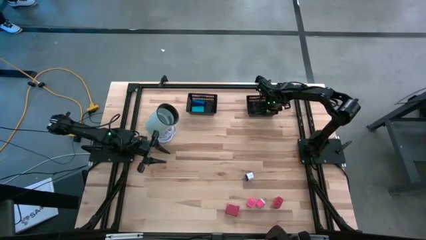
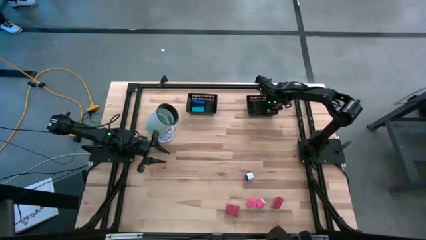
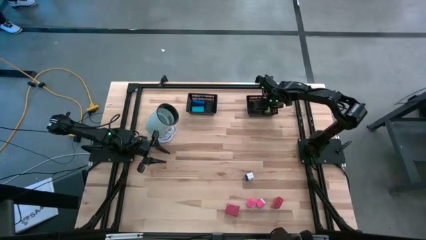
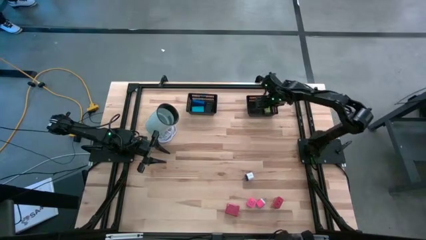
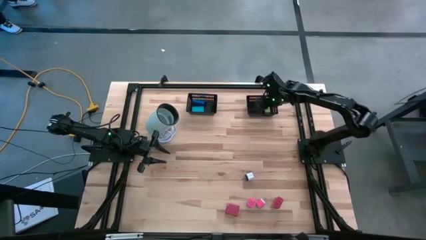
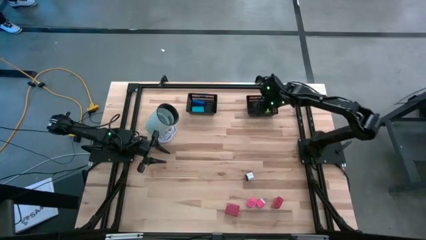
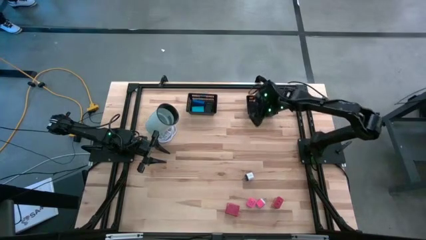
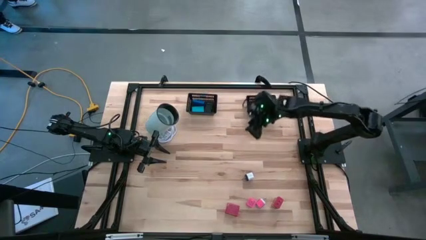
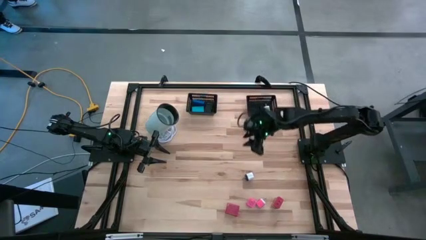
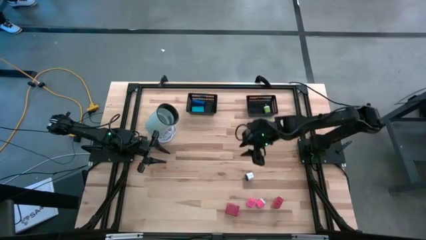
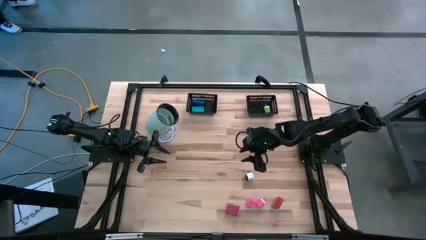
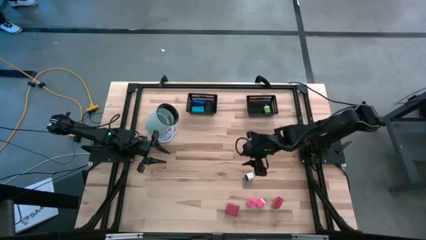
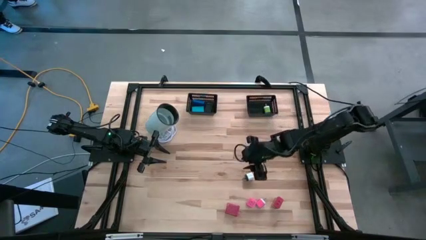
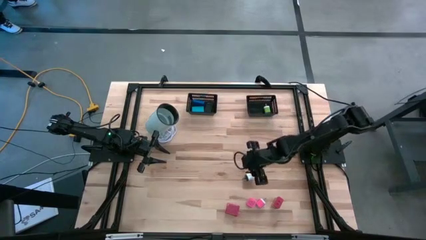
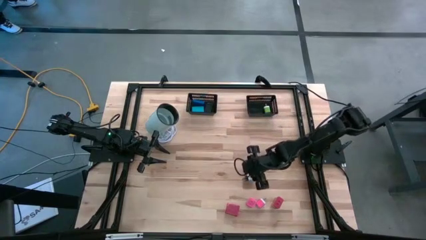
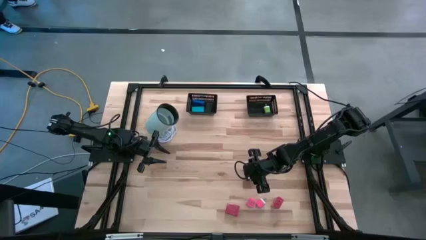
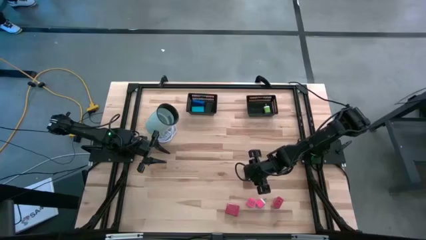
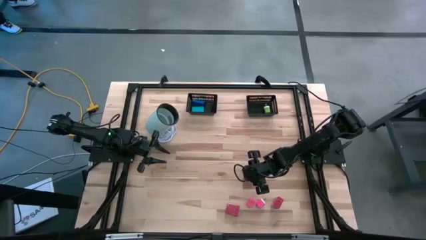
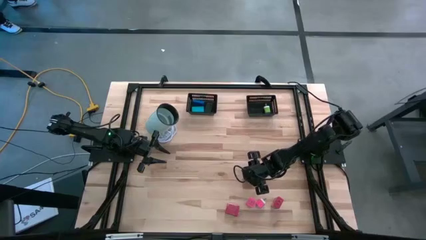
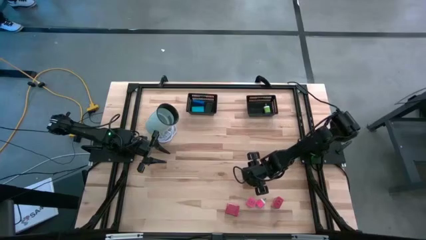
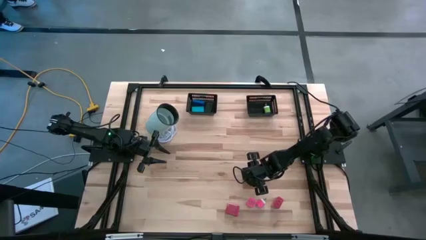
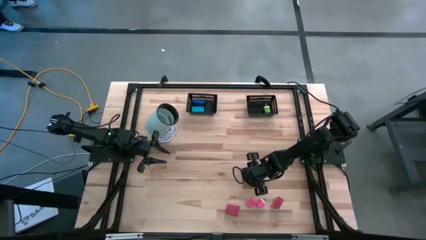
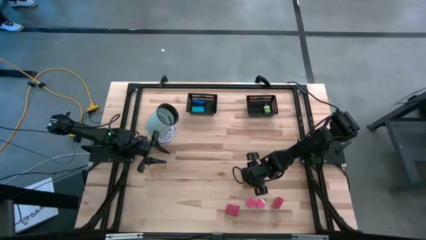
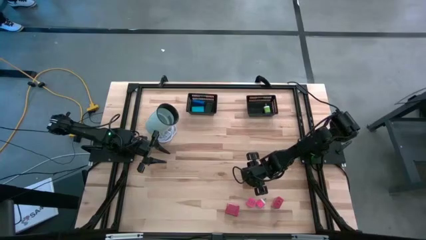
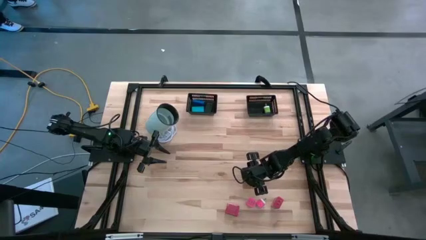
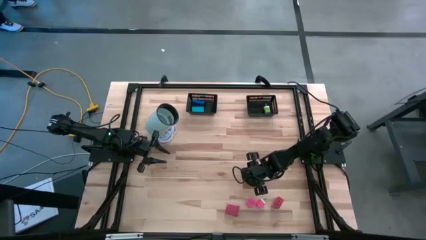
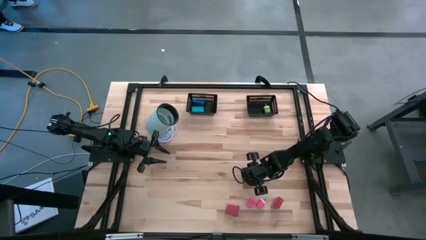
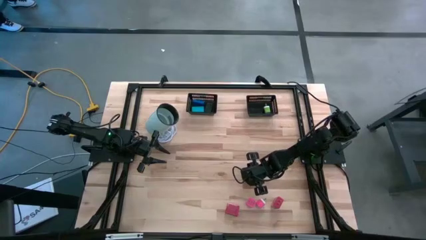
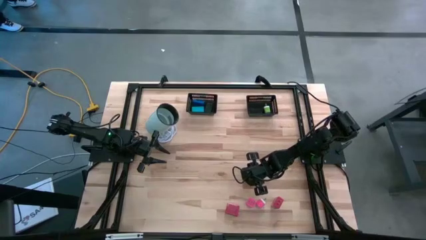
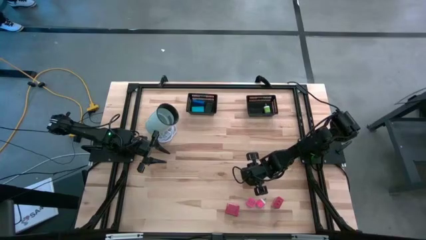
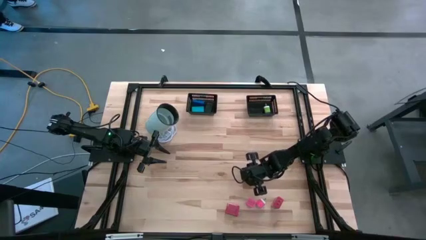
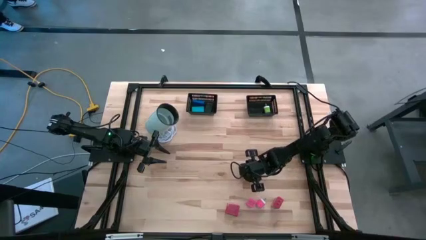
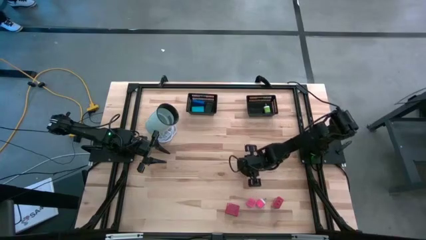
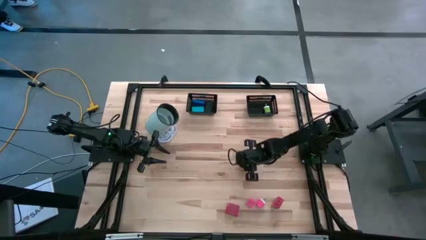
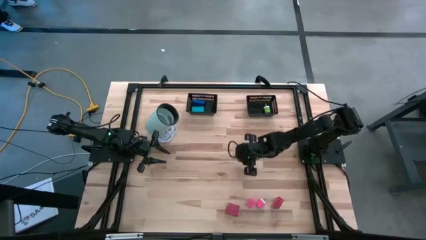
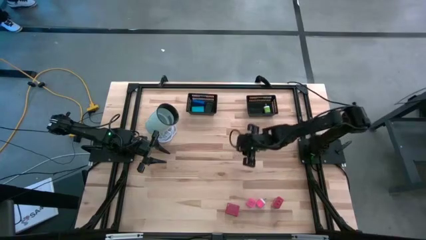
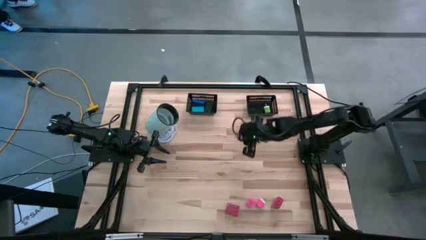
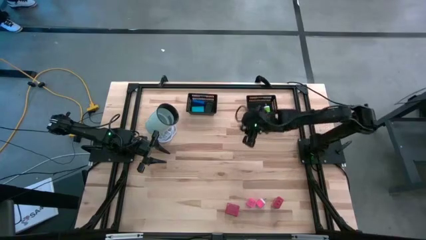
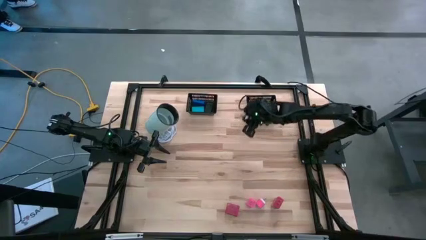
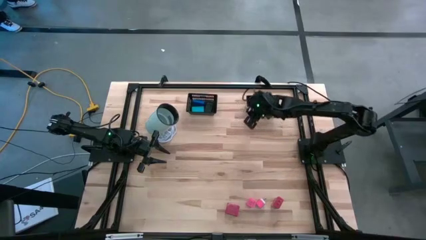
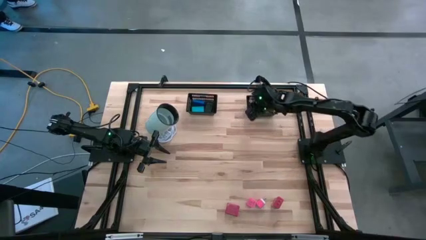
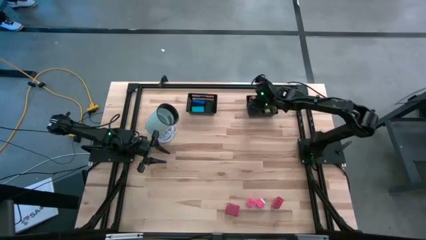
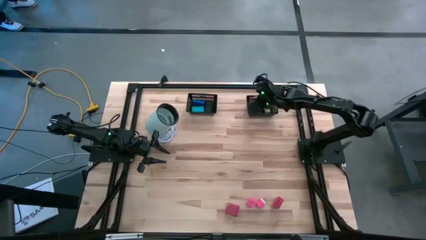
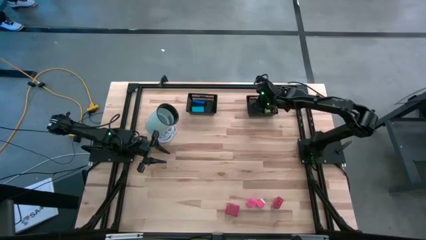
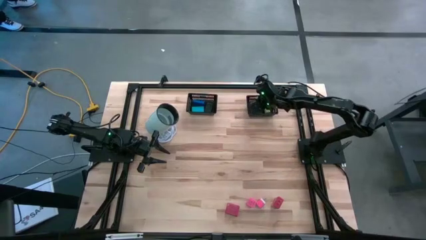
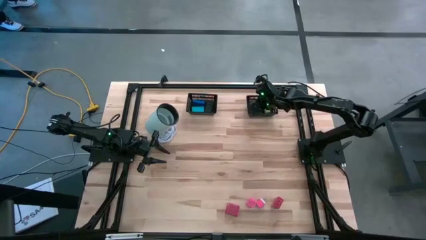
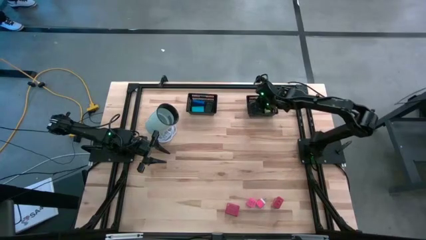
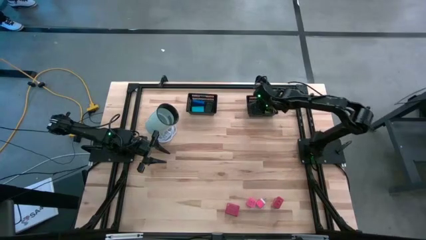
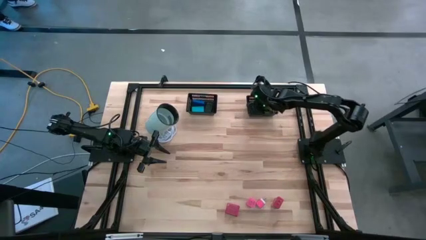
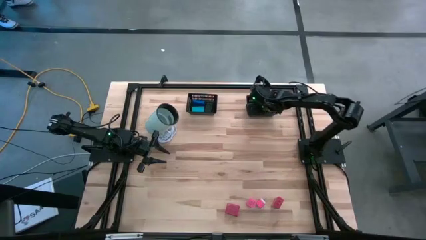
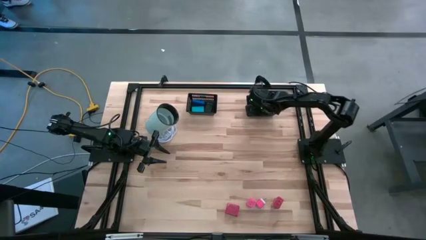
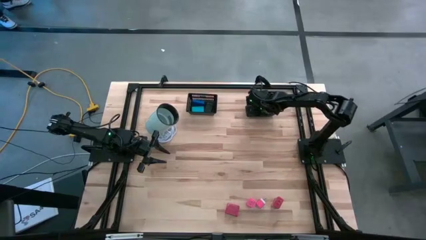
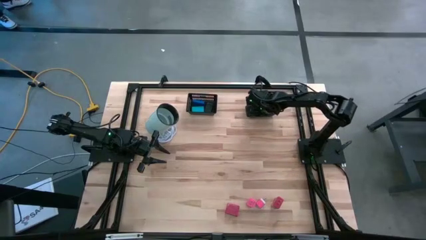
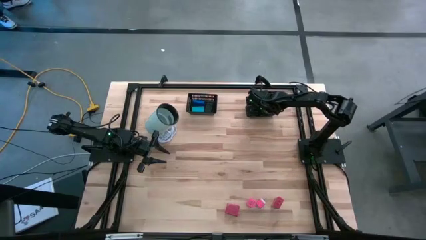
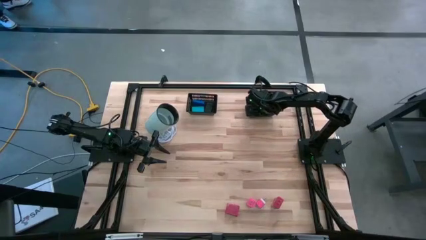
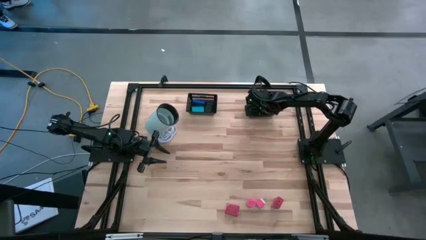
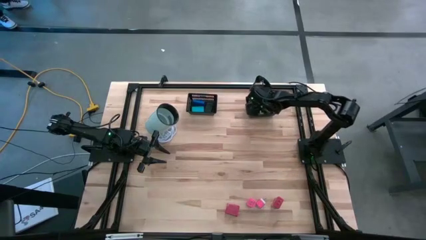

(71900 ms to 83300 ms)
Task: Pick & Place Office items
Put the white charger adapter into the right black bin
